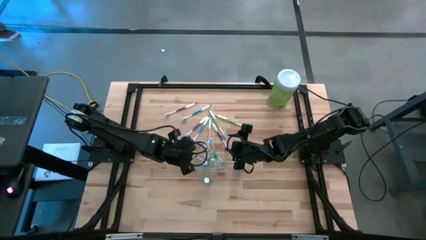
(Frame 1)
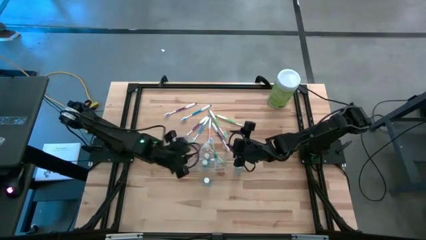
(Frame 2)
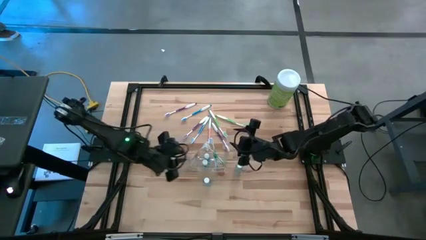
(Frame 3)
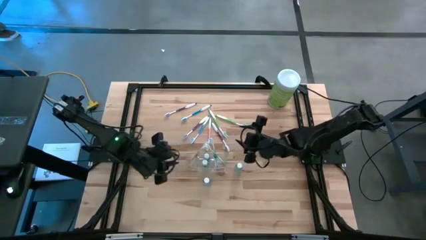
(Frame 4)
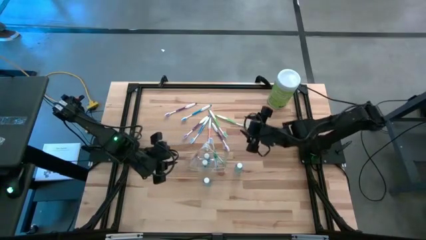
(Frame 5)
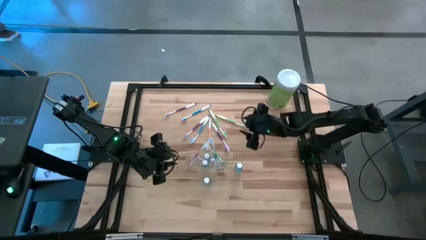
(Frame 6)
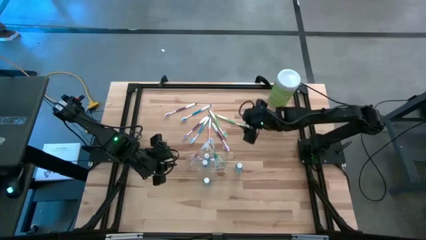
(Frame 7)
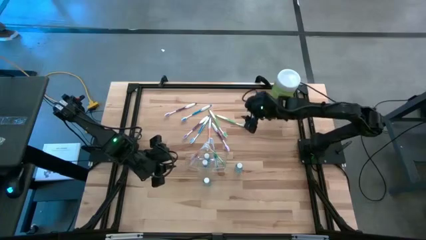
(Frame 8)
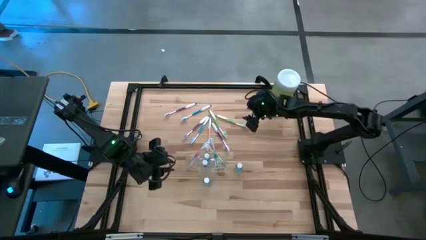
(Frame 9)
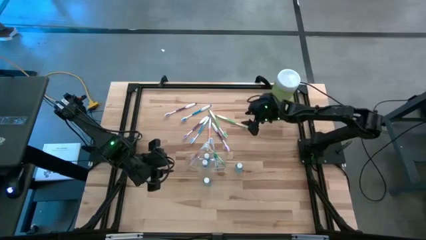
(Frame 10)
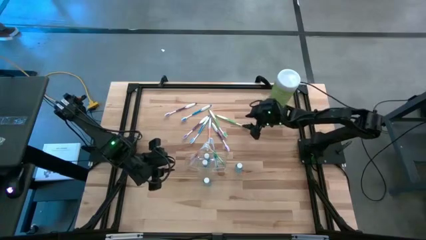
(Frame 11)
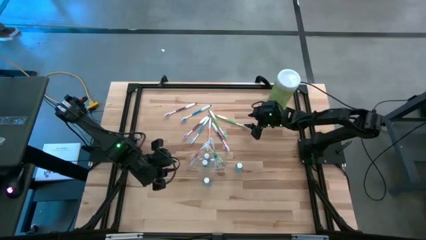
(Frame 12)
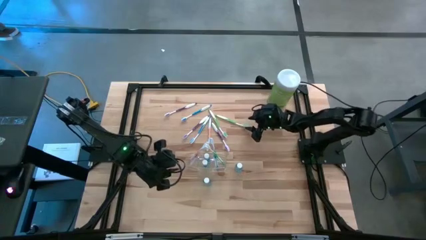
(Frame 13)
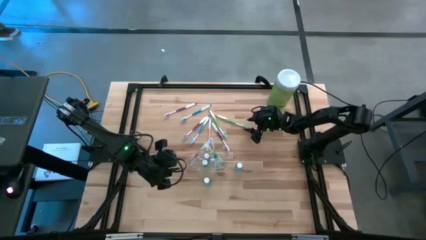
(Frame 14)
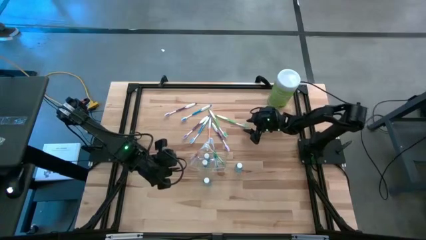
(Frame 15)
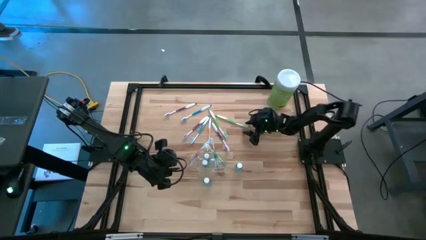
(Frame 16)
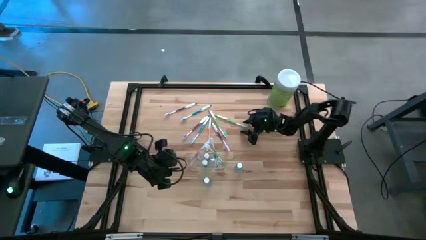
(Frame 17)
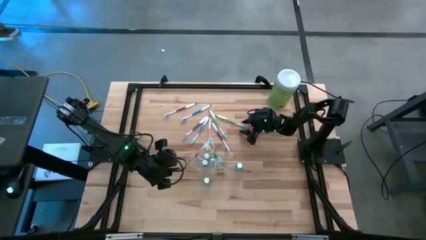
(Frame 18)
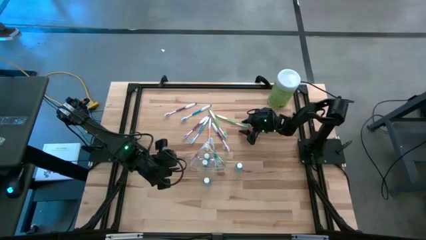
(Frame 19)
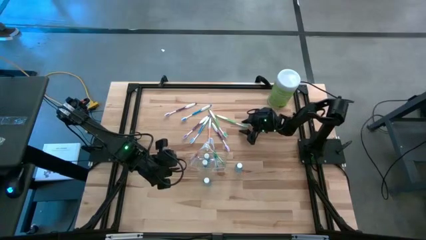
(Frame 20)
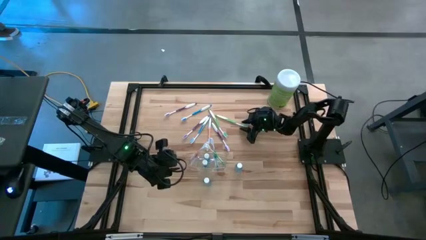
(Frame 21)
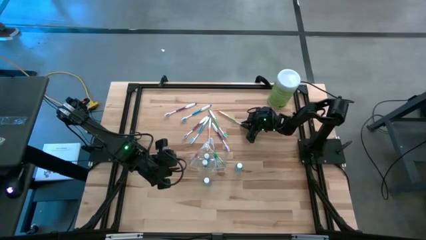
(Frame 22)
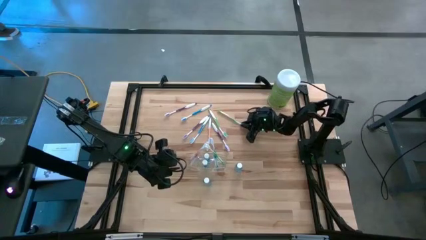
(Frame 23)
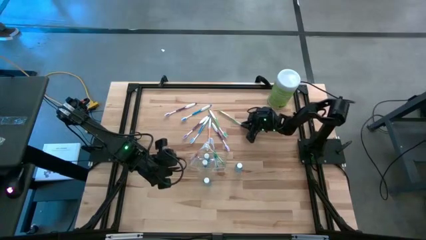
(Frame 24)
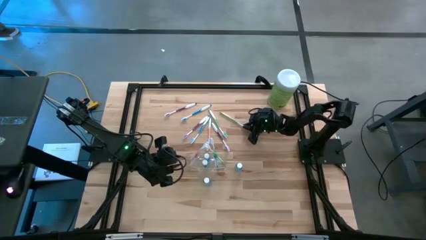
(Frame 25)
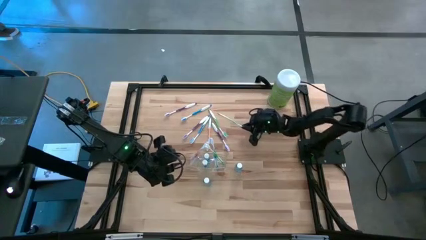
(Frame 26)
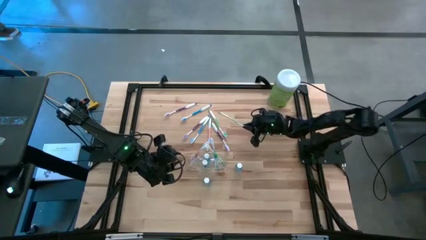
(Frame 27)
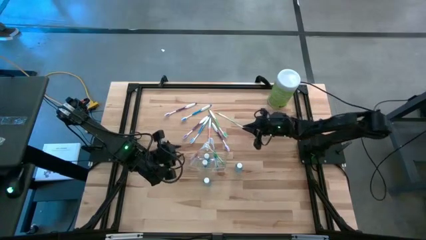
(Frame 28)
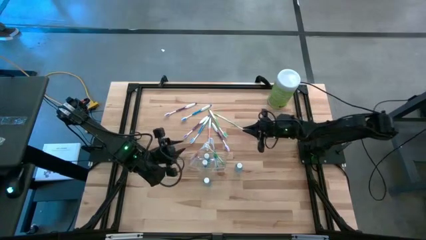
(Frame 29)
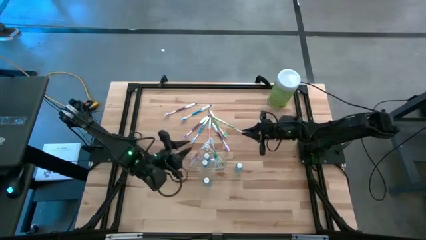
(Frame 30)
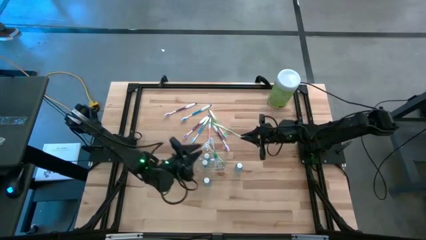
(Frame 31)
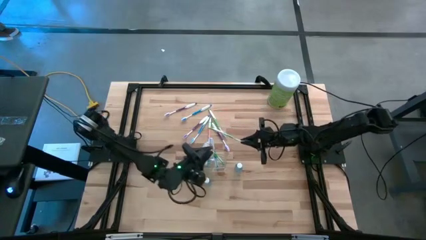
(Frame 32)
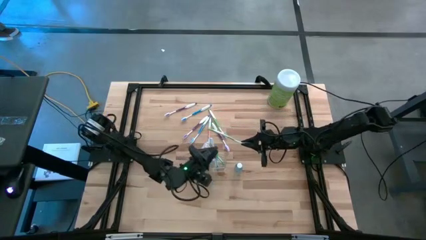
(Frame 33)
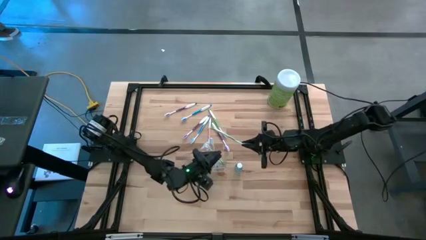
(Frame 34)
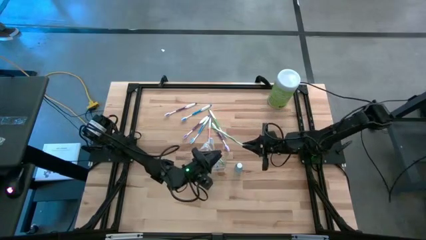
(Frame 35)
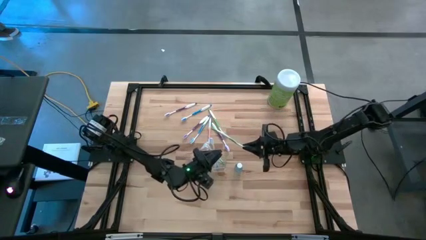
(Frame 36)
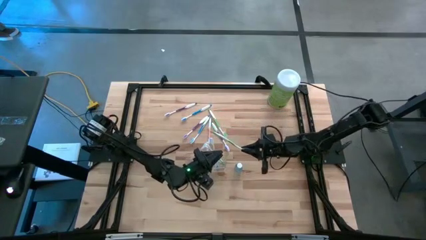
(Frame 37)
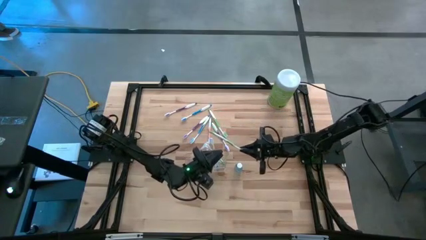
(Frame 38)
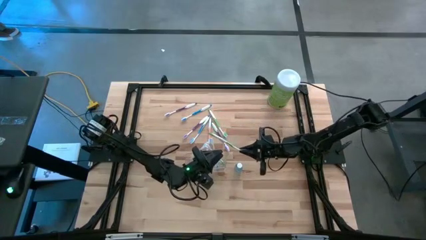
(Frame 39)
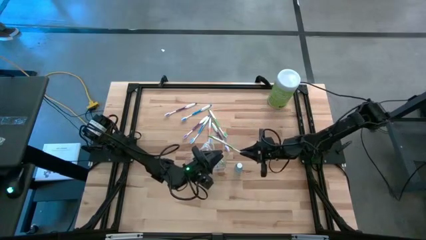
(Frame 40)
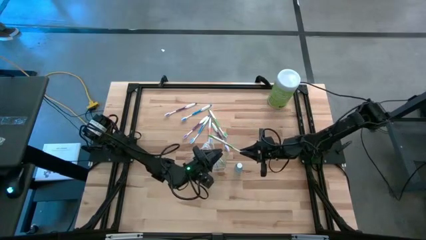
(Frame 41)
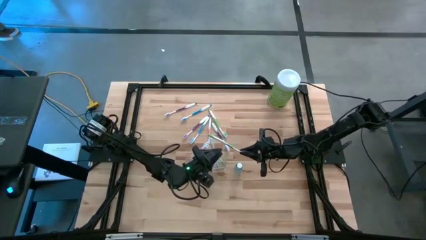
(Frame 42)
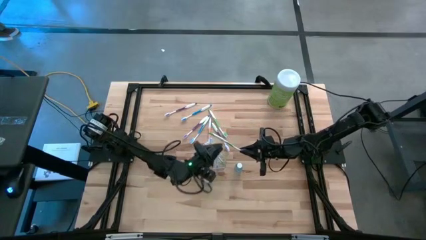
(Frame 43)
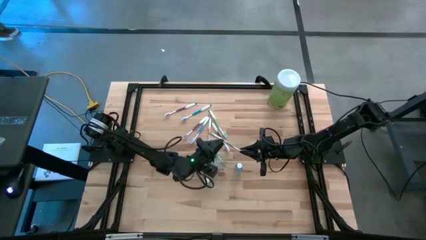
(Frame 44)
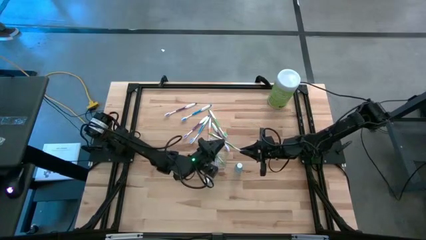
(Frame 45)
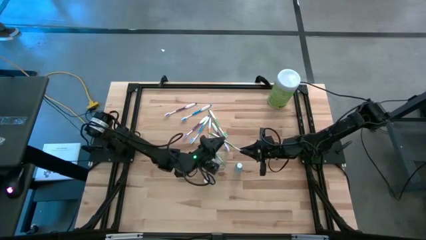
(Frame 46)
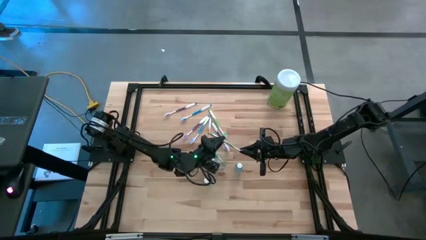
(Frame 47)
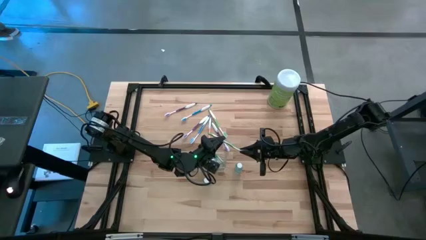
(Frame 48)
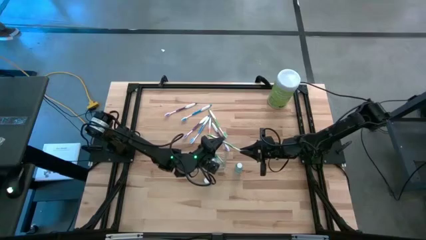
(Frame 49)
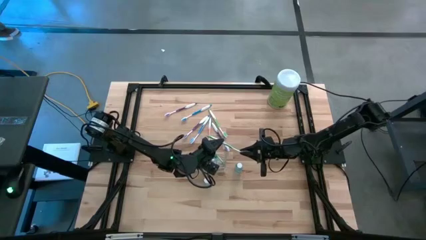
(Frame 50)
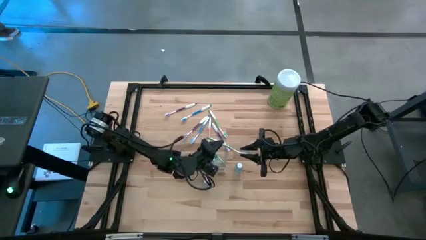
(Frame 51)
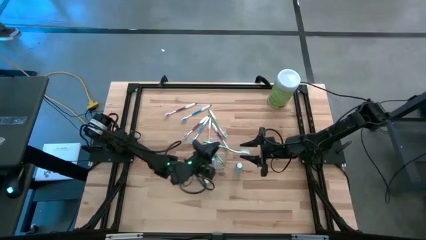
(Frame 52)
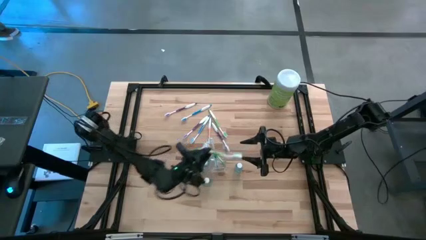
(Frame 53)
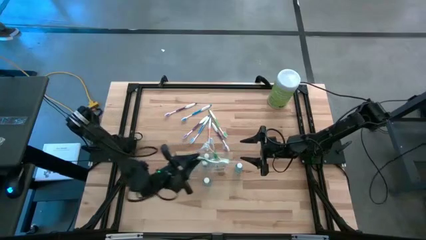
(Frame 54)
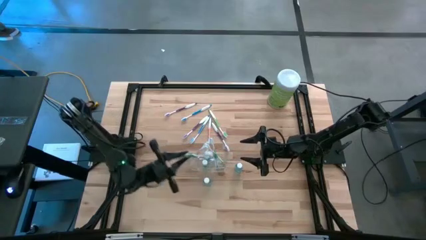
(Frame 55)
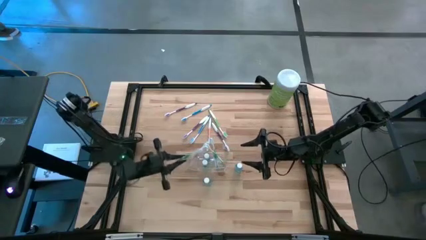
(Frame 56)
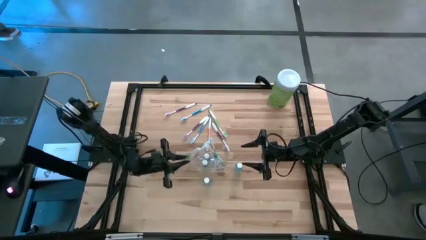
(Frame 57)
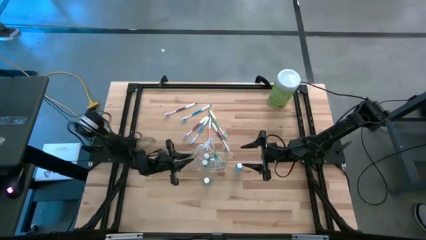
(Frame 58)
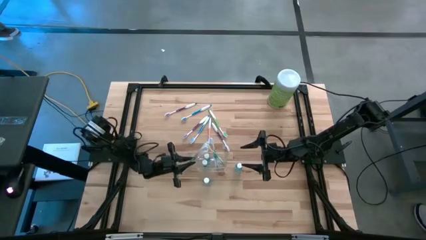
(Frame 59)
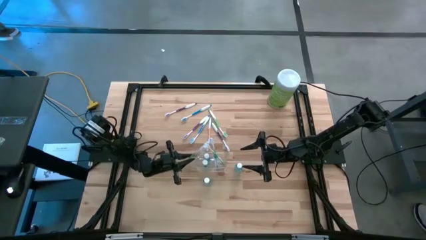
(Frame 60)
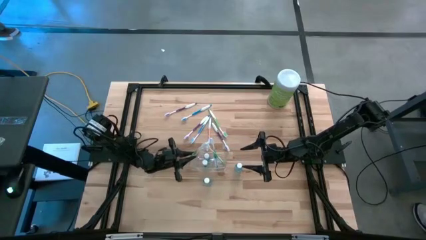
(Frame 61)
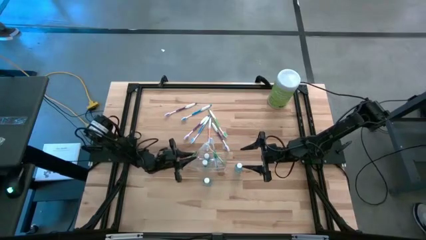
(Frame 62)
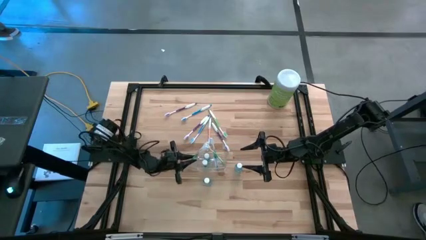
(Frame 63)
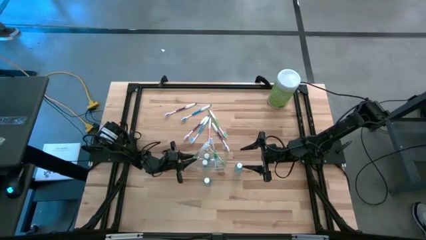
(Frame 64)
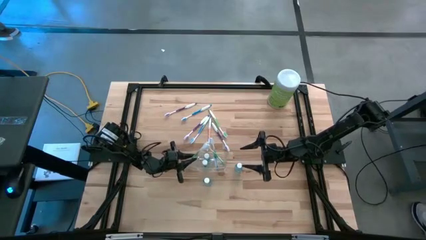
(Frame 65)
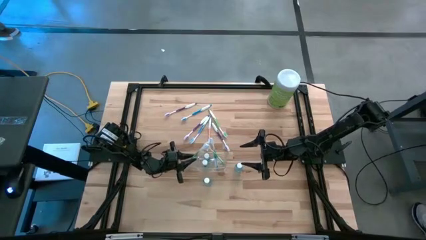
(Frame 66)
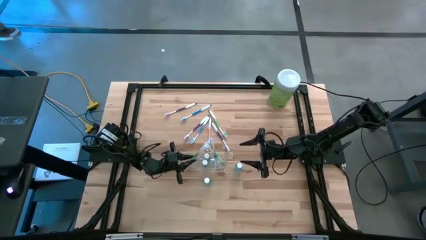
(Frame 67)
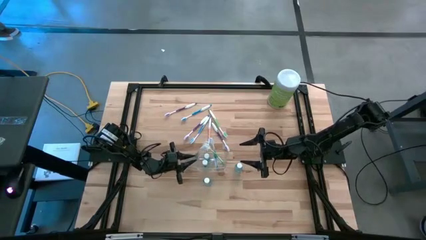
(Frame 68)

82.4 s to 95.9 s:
Task: Pick & Place toothbrushing station
Put the green toothbrush into the transparent organizer
